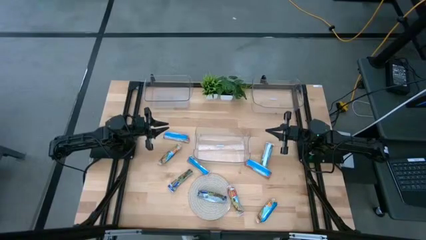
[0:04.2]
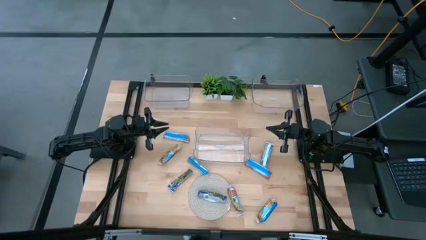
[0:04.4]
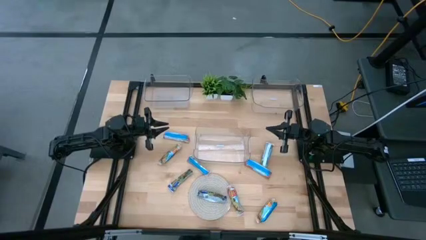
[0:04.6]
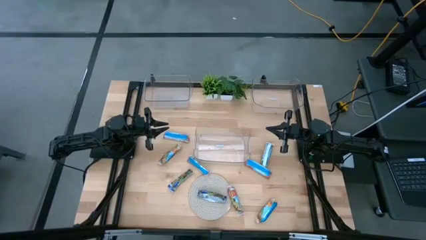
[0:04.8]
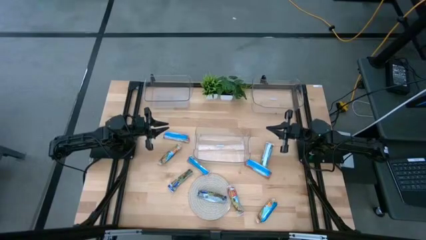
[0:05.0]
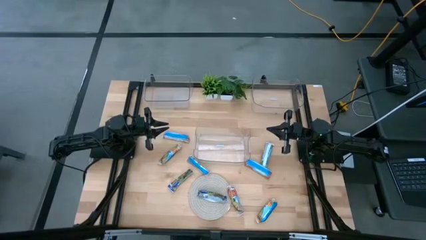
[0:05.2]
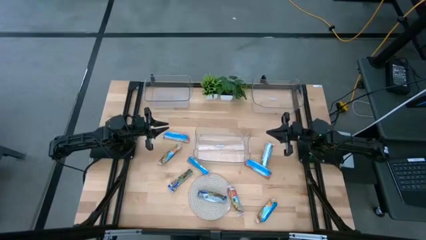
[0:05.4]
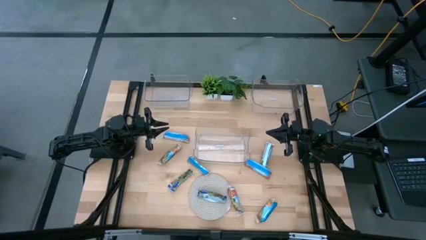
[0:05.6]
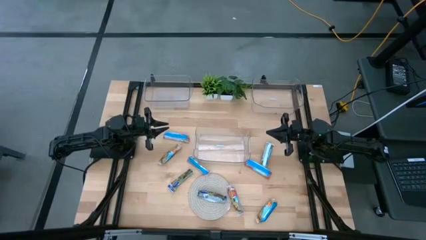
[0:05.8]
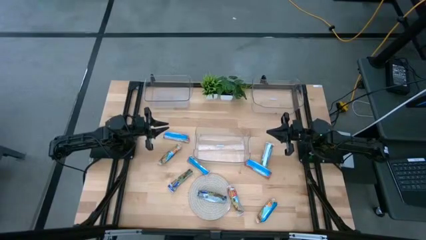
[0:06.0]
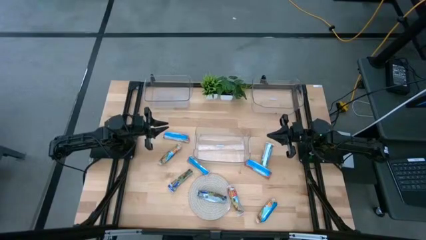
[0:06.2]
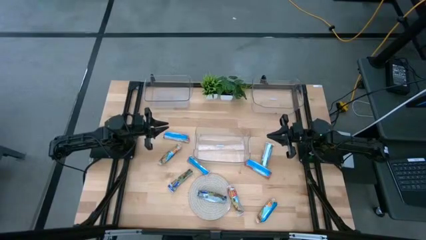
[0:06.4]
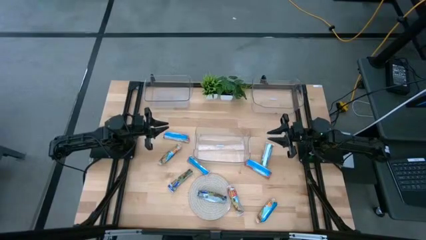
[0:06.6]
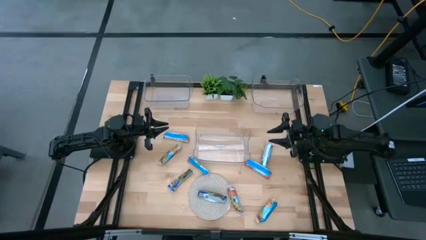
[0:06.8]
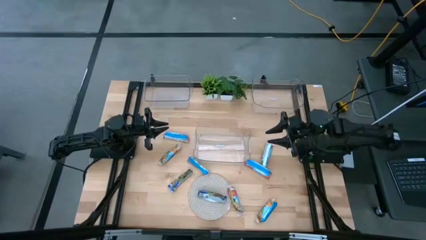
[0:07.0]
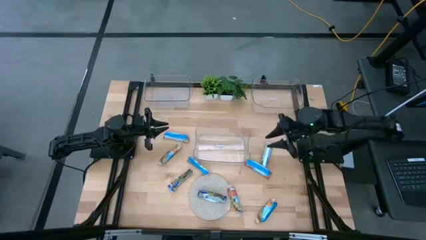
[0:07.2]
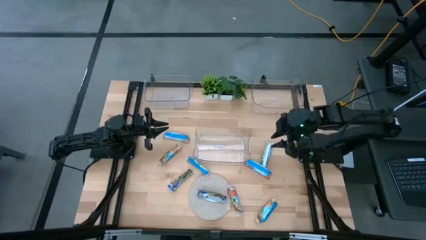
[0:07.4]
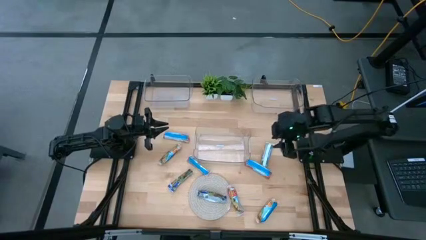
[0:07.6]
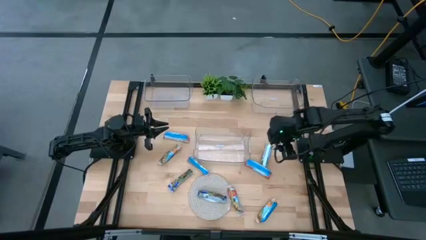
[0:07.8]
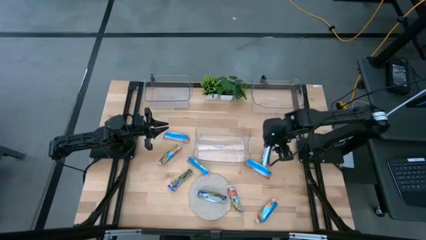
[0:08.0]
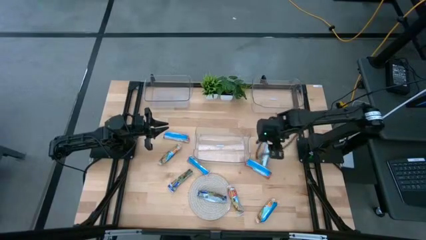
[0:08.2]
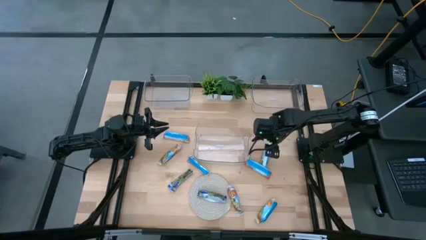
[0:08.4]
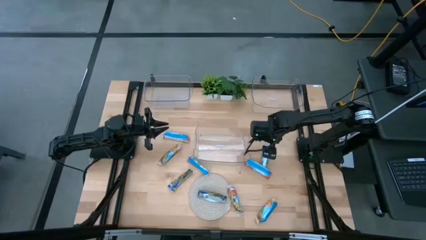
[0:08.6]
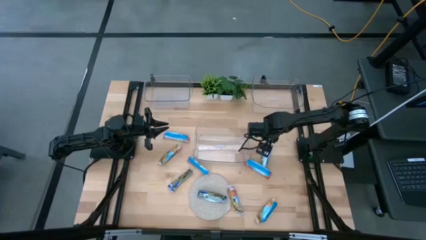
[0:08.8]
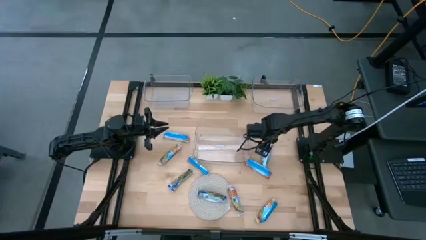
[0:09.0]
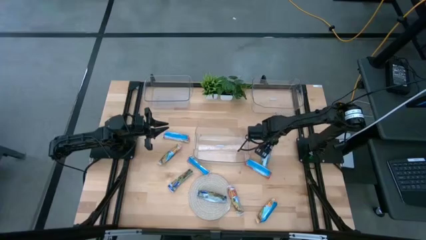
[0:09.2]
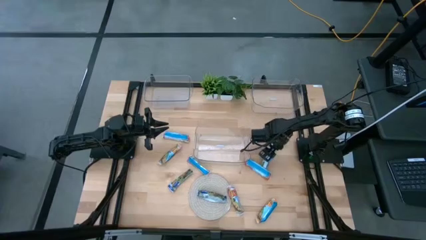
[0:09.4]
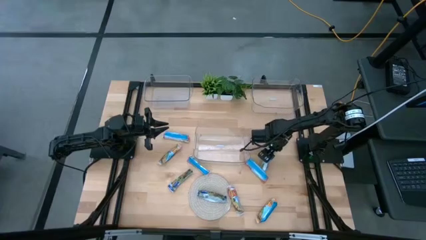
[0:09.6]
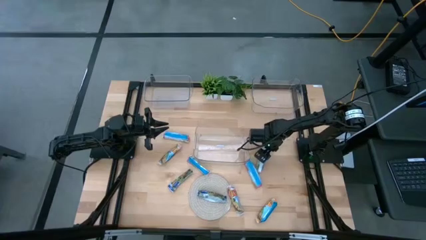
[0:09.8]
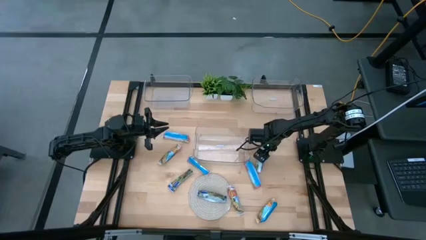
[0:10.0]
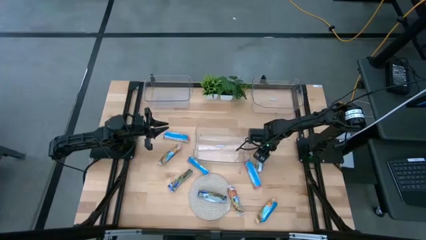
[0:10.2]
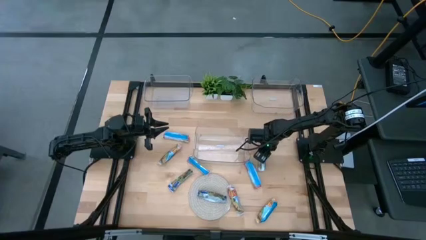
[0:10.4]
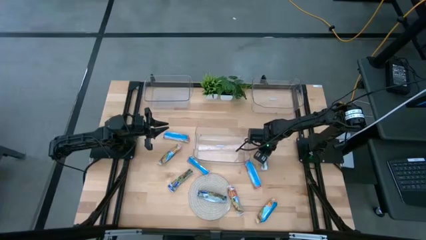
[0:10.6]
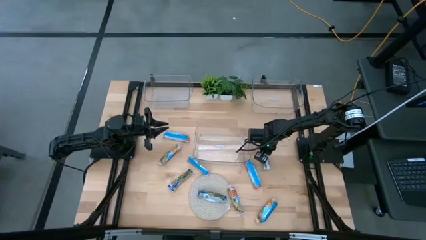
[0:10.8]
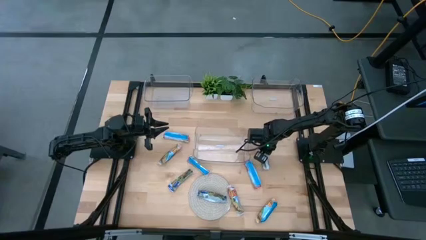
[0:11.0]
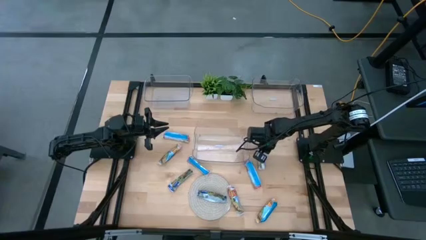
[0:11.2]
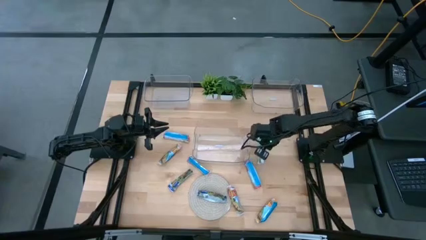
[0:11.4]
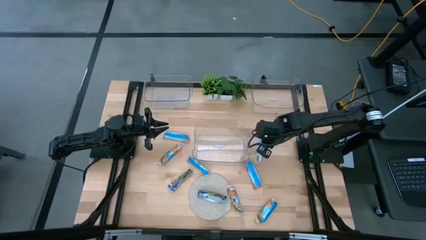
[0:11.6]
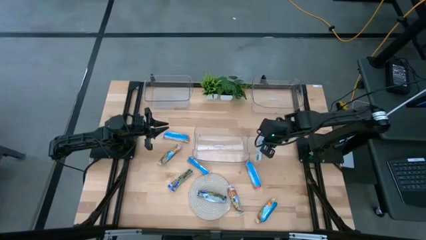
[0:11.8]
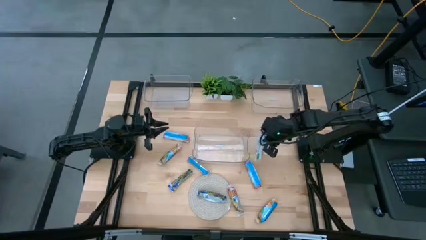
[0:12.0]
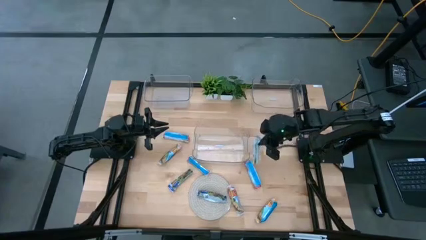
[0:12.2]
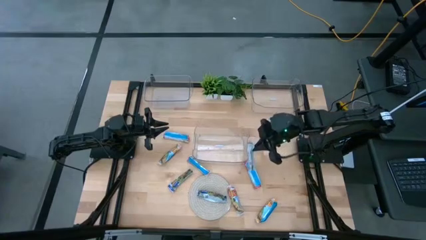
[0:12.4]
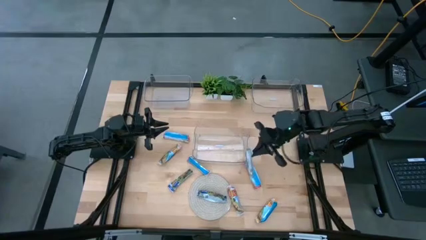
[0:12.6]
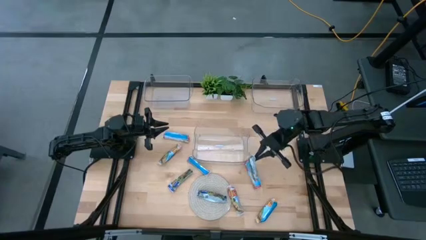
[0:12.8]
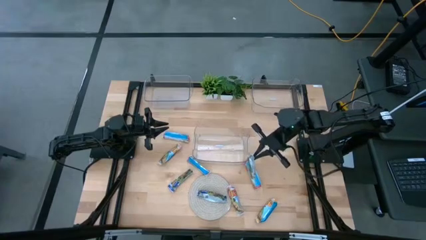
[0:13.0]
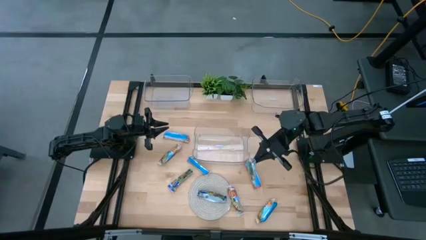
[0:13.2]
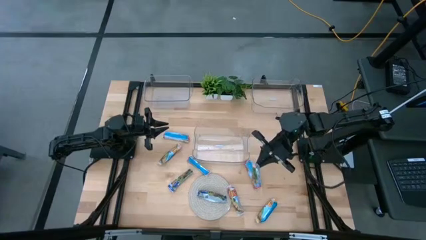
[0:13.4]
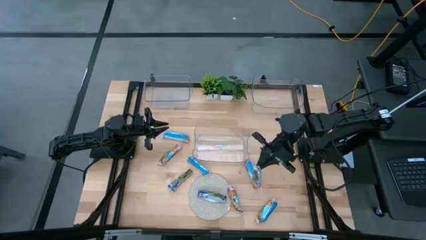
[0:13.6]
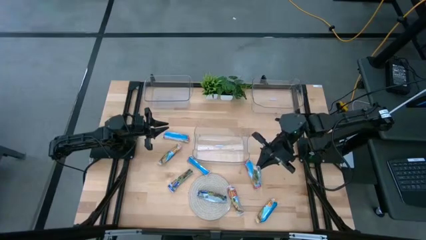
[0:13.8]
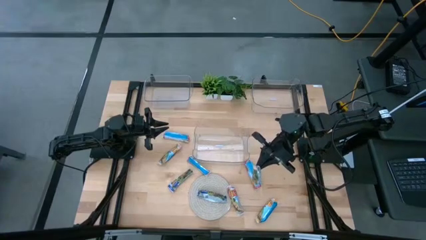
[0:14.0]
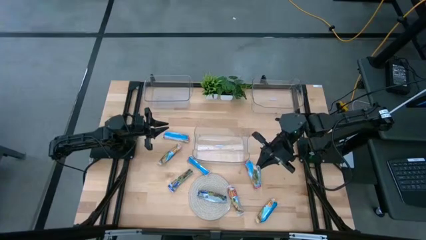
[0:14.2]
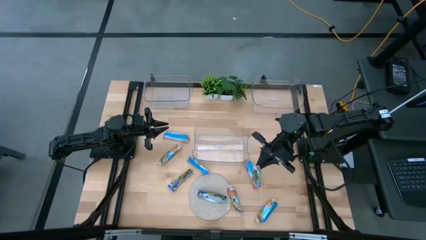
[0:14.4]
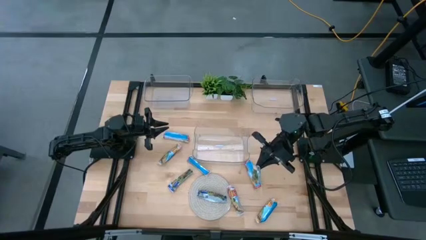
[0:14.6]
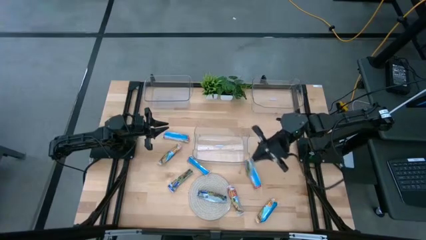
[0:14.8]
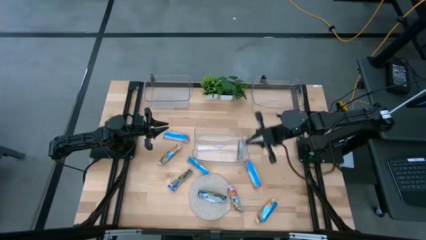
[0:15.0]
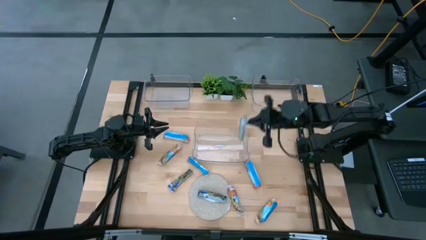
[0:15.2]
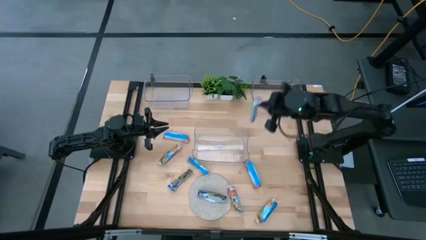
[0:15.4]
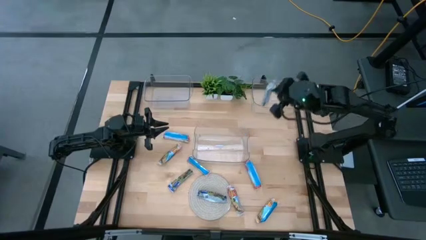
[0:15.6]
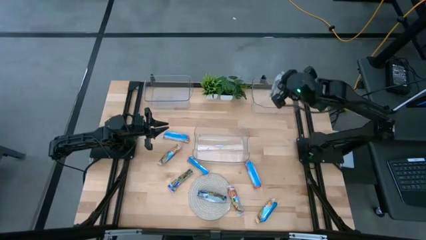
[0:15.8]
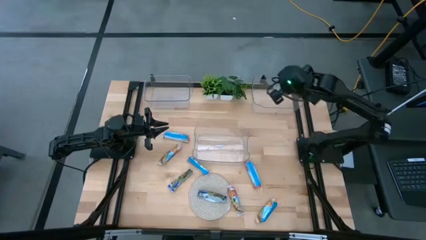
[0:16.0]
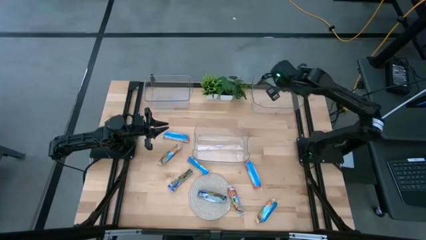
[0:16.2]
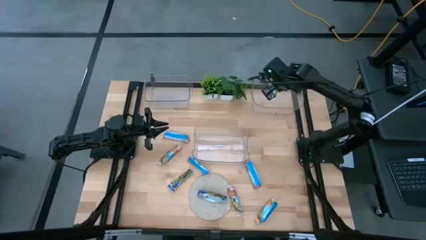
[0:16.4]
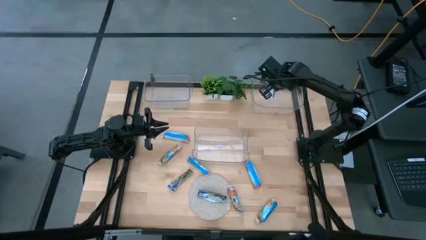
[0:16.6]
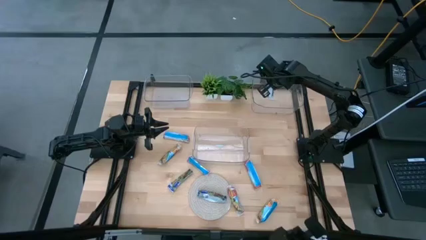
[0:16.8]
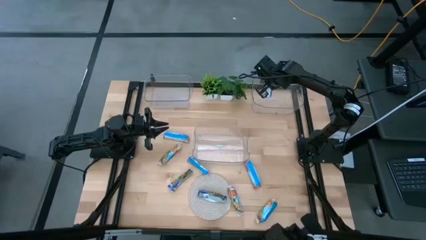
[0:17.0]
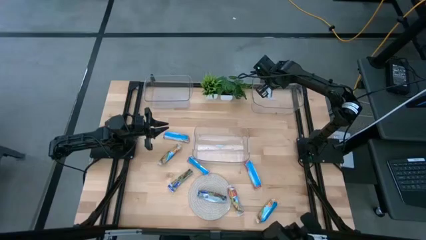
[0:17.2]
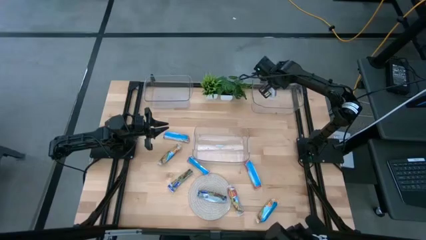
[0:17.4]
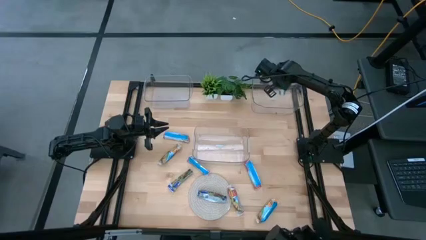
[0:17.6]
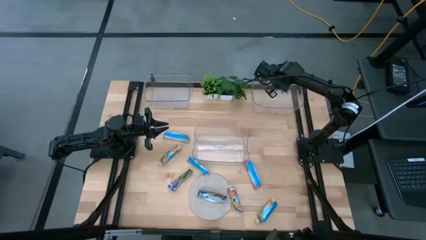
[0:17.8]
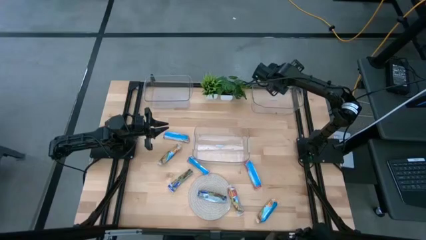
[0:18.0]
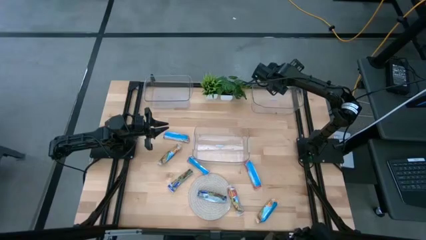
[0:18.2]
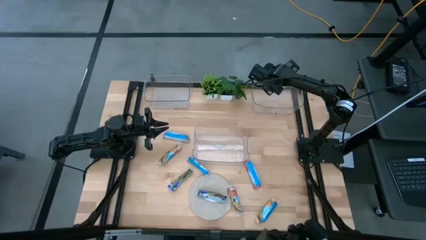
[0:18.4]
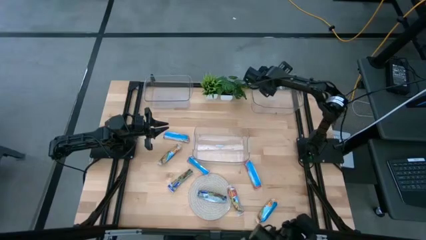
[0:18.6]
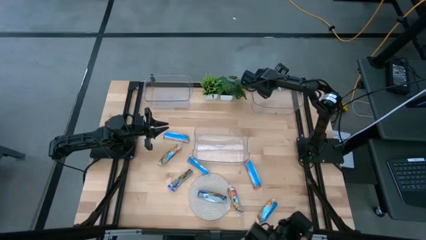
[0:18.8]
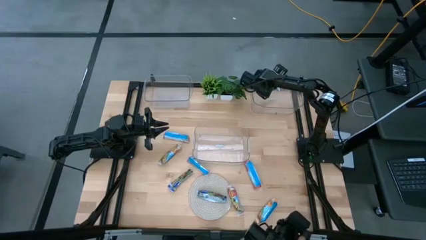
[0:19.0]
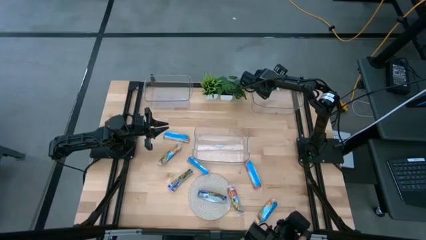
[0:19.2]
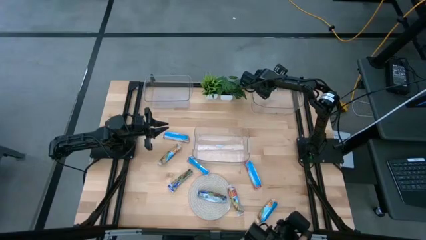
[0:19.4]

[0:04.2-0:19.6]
Task: Pick and place Granola Bars by type
Put the right orange granola bar into the right transparent bin
